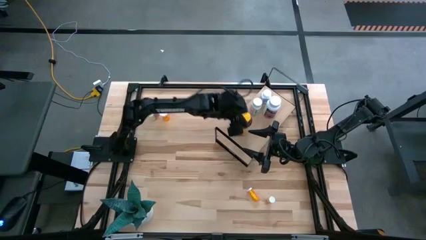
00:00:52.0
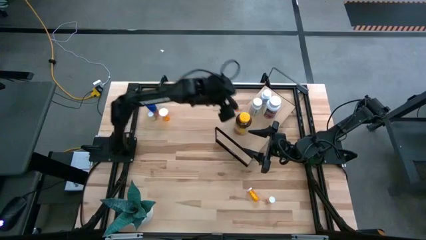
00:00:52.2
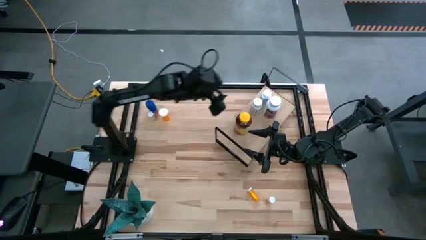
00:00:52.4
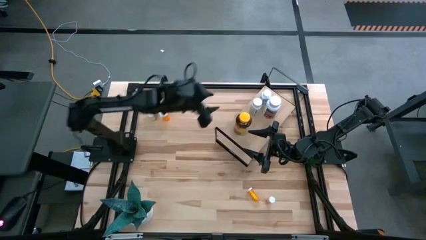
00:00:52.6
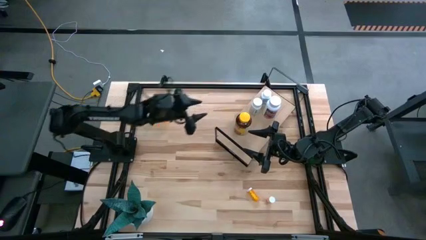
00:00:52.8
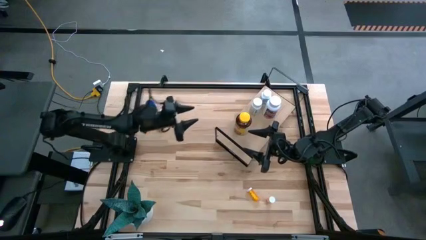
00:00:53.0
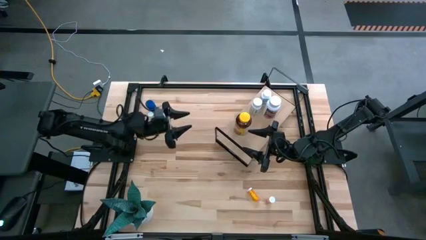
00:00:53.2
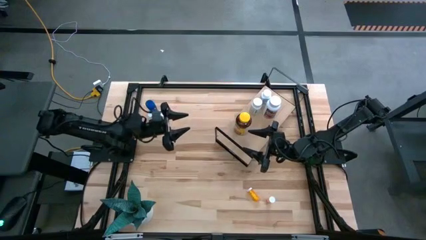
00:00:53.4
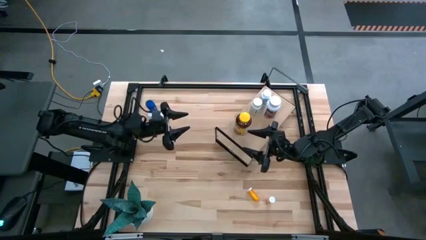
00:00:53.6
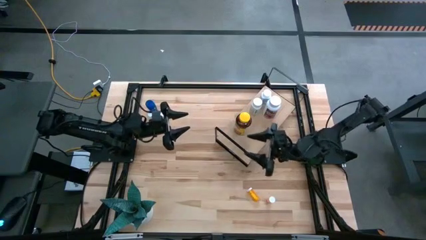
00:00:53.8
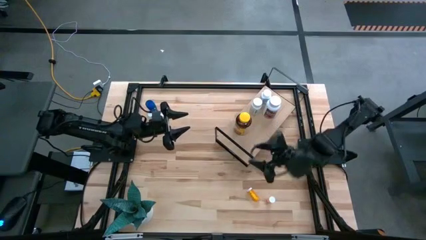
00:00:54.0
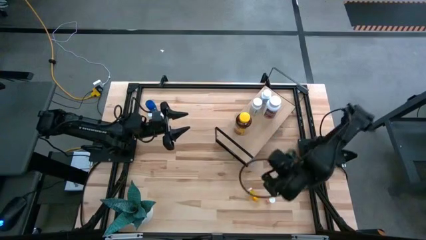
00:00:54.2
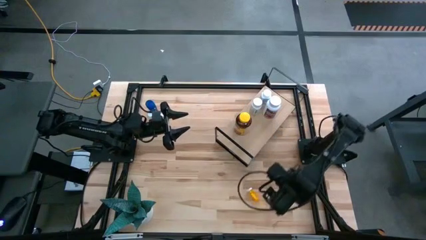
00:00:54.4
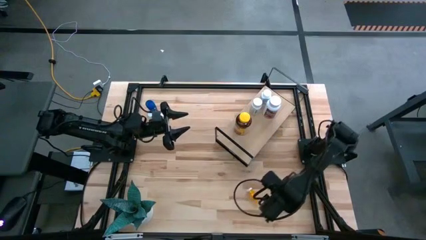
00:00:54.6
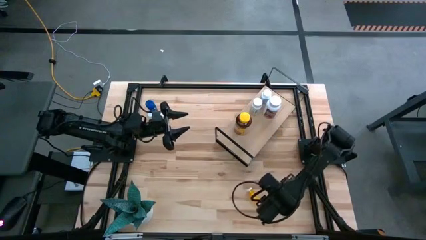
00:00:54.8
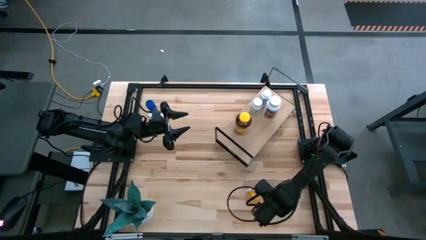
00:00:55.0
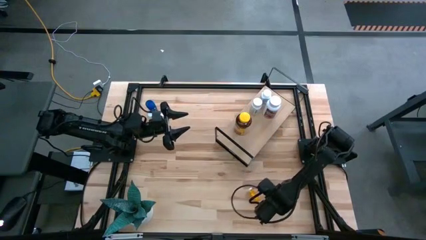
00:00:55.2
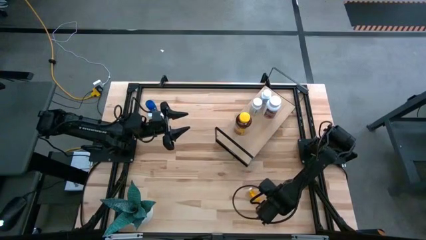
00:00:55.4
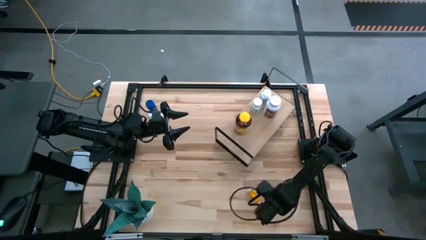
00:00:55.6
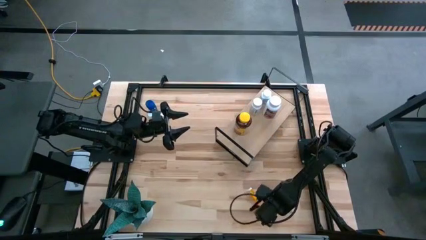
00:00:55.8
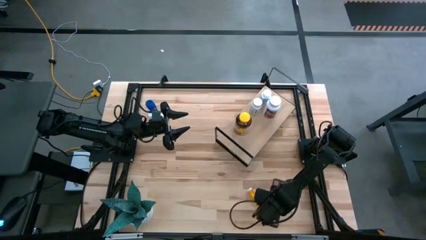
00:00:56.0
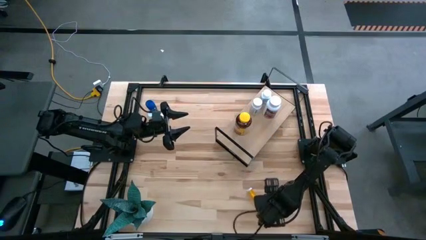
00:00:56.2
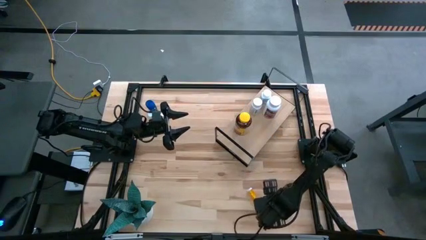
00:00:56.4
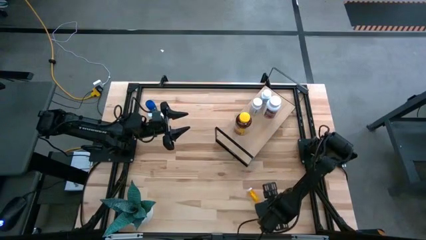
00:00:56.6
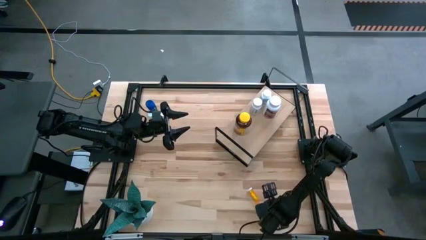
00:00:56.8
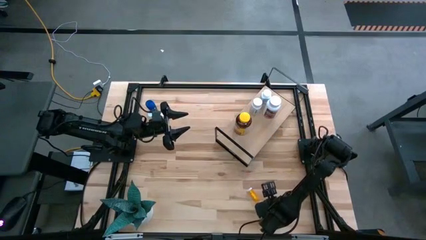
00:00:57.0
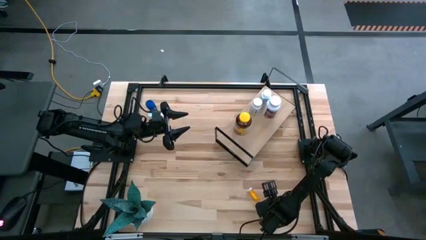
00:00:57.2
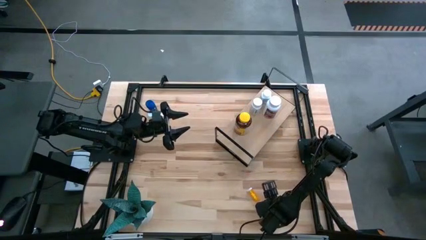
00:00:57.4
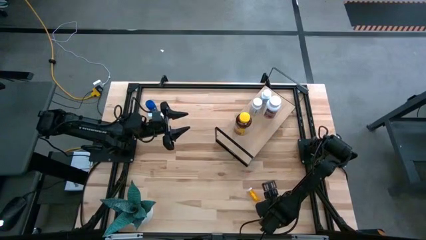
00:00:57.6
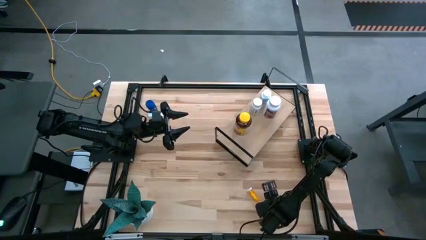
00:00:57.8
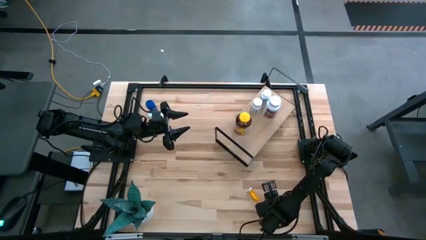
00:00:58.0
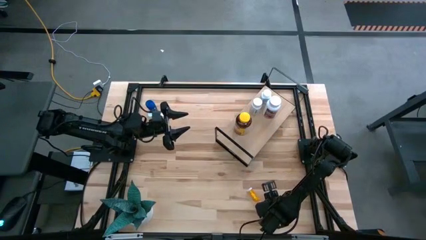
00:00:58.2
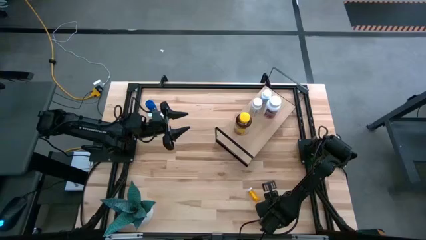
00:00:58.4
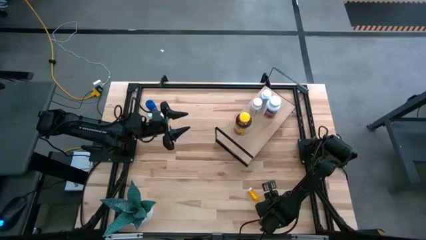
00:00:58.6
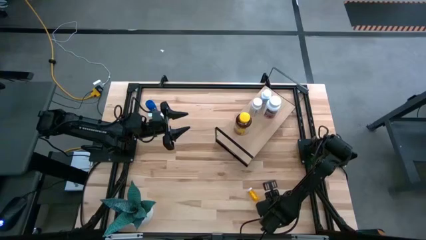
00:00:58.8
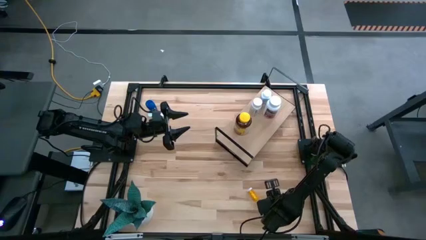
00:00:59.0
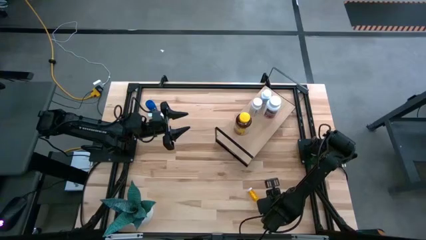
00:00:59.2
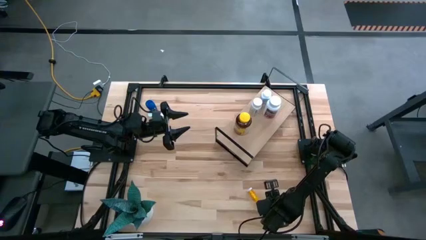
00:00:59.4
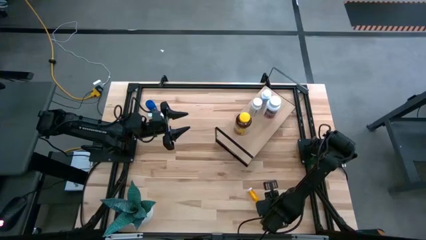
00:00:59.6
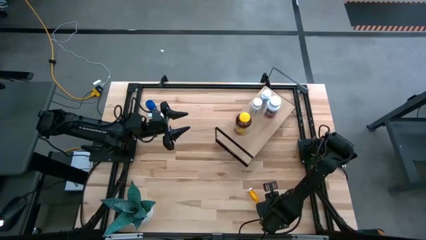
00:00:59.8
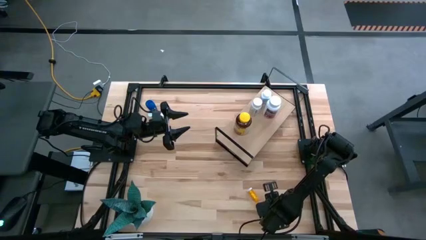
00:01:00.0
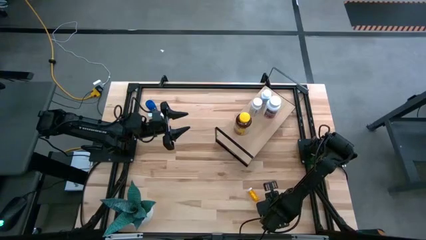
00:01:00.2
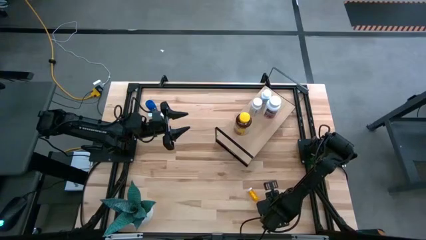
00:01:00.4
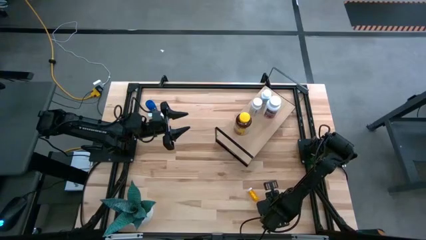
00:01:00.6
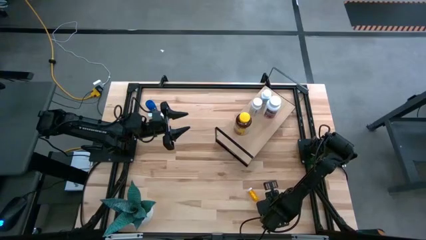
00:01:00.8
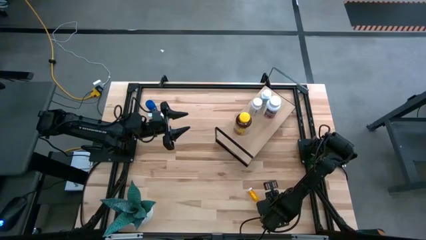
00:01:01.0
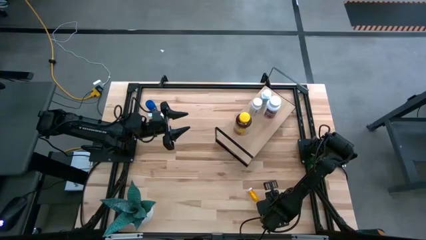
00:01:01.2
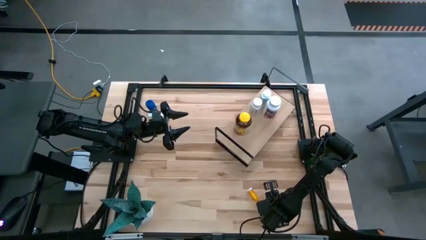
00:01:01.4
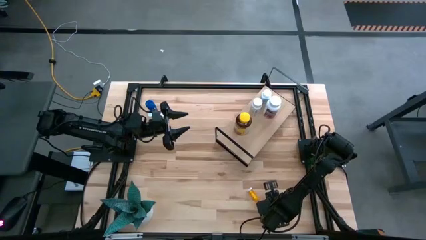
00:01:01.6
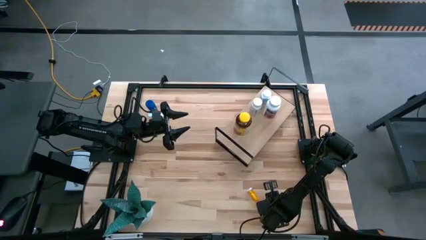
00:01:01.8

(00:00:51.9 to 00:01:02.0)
Task: Pick and place medicine bottles onto shelf by color
Put the red pill bottle on the shelf

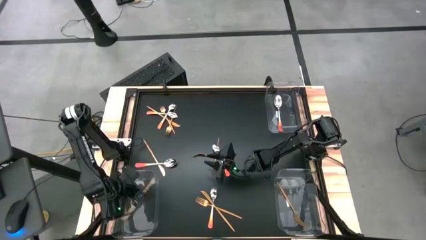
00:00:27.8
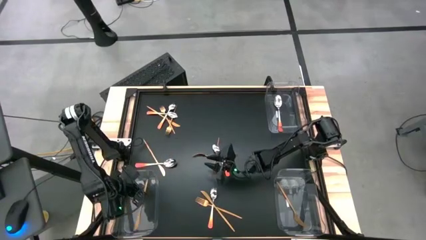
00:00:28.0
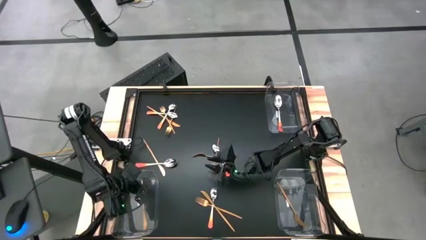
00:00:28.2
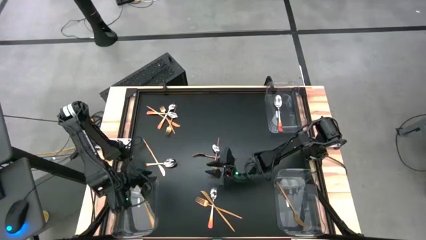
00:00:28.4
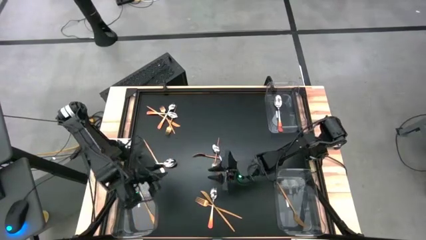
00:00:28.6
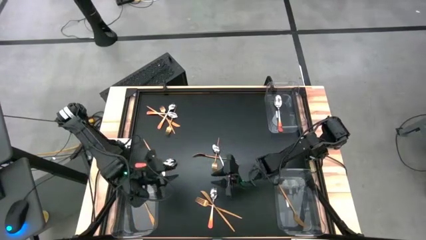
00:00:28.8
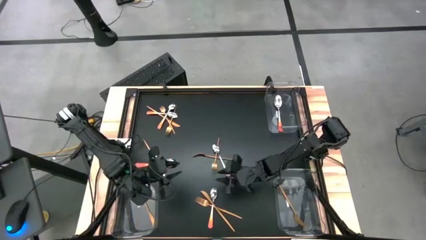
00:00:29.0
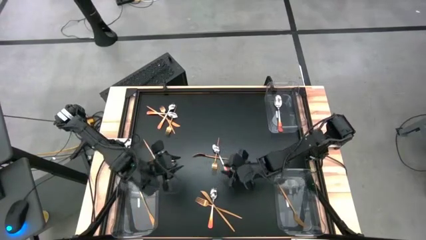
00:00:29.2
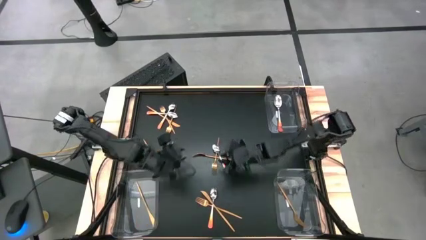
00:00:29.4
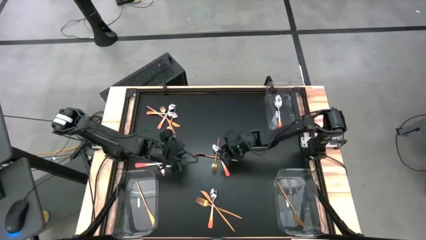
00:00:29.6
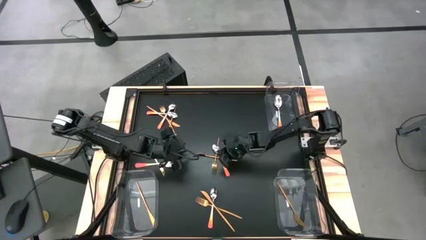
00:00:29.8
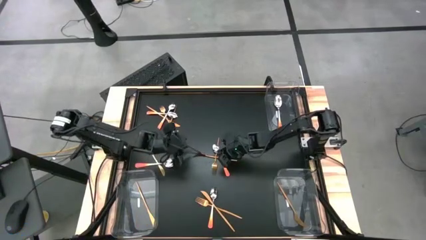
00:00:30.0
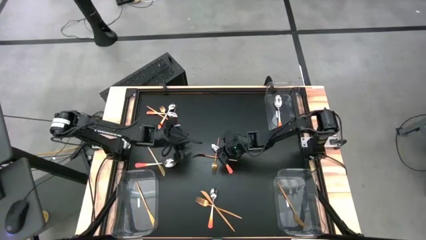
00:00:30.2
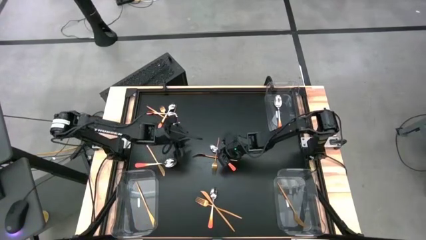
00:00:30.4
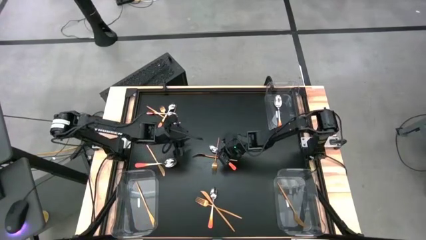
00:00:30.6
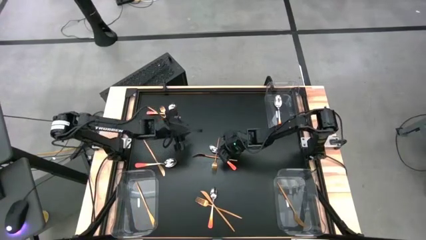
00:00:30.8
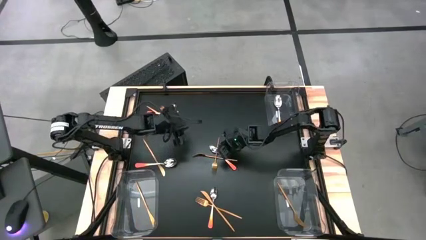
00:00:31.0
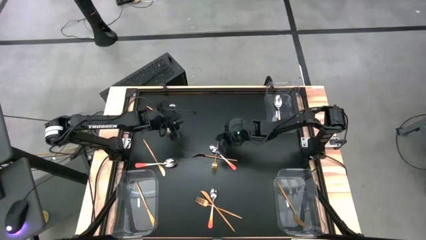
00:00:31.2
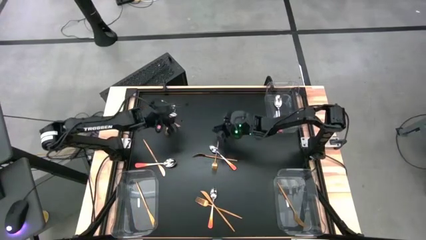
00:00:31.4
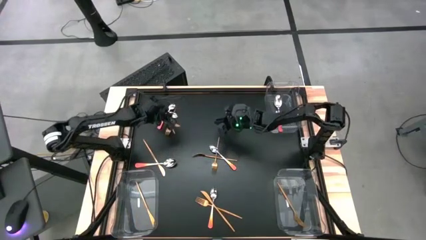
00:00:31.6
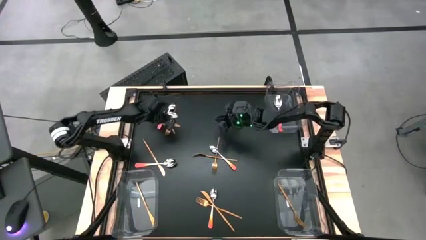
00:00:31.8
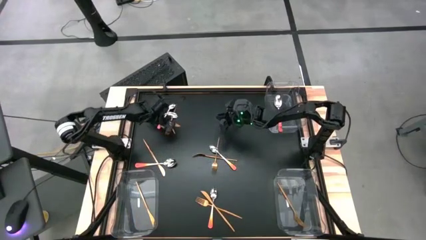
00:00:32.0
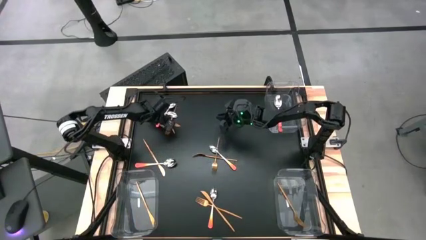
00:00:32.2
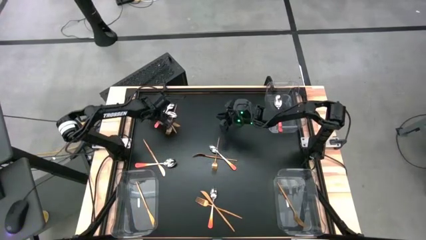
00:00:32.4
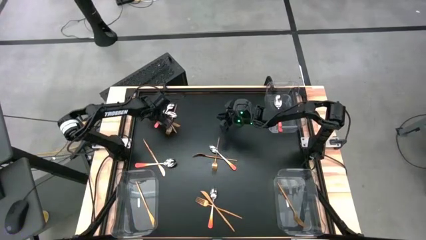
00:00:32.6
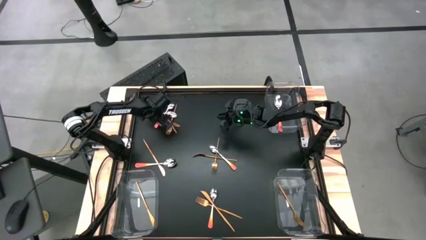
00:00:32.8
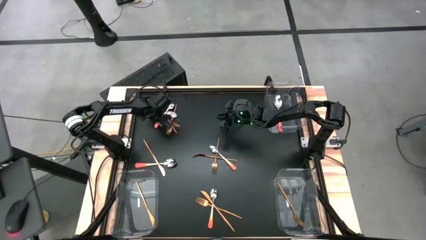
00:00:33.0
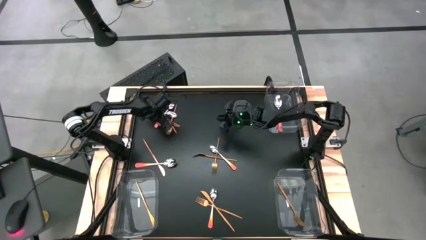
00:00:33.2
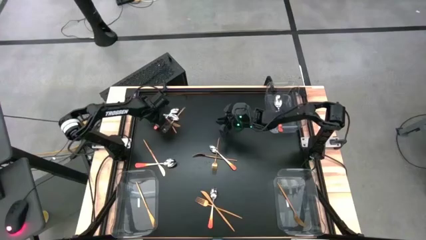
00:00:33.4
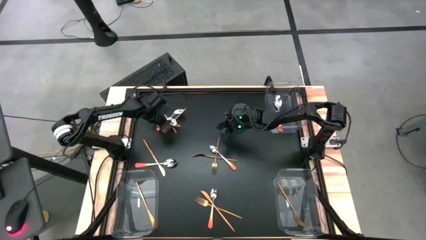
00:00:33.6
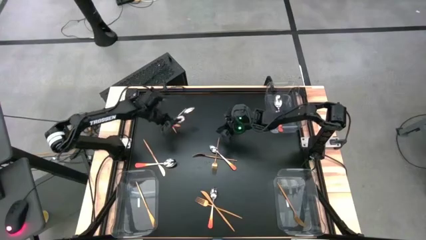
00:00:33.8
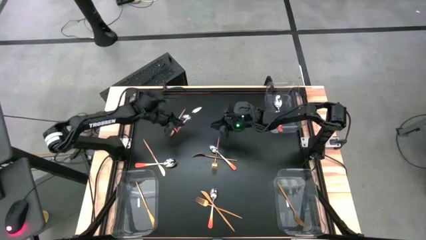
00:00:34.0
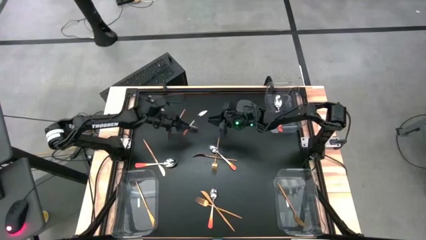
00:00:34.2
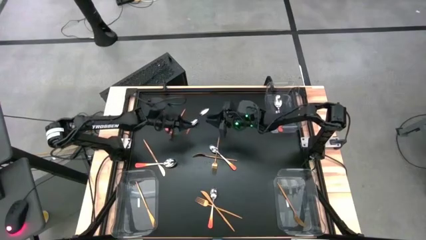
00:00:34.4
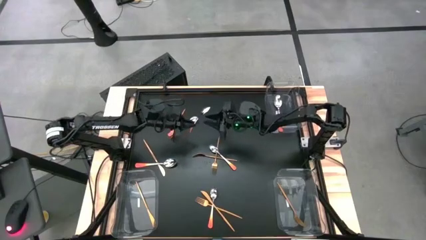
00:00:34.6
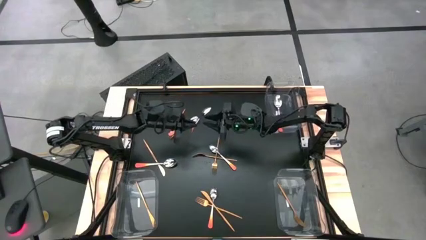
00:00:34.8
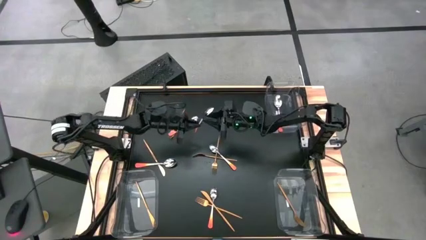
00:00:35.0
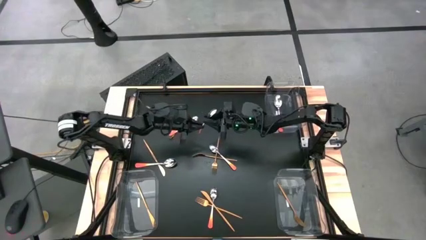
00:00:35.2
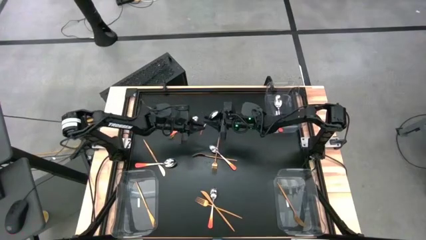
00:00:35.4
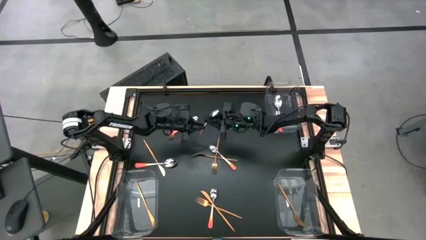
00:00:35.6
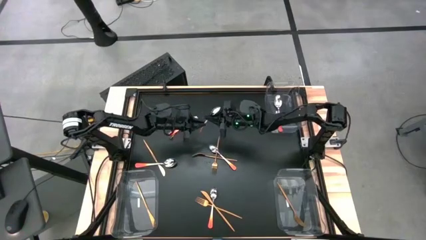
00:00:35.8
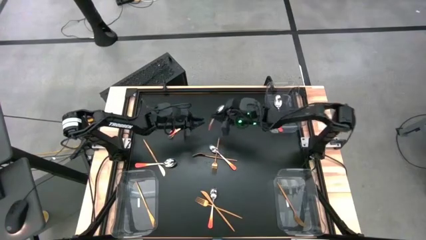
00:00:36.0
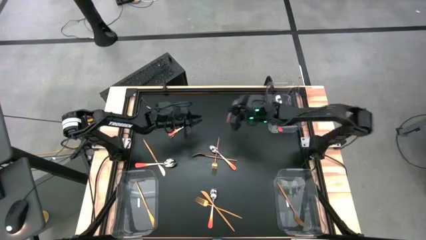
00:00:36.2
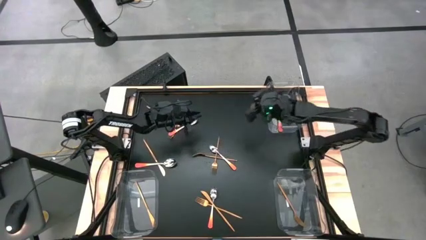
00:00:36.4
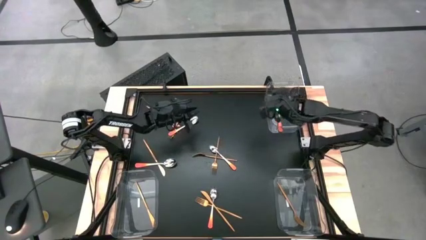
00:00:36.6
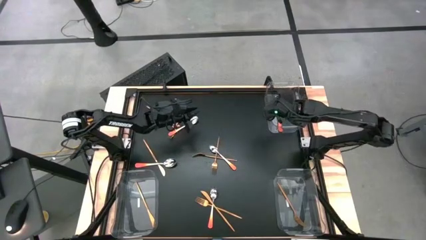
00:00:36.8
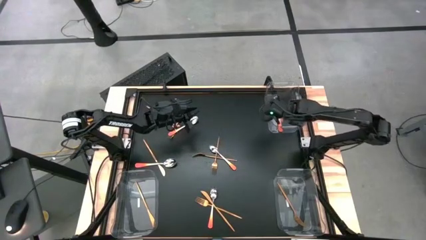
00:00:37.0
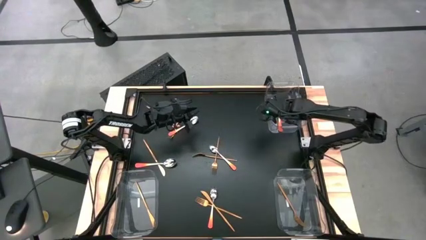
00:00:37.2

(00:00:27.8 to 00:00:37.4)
Task: Sort silverware by color (type)
Put the orange spoon into the top right transparent bin
